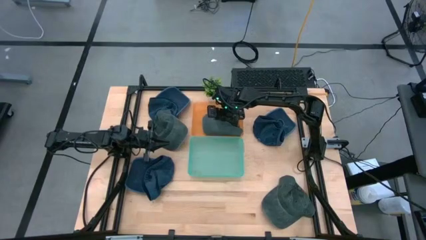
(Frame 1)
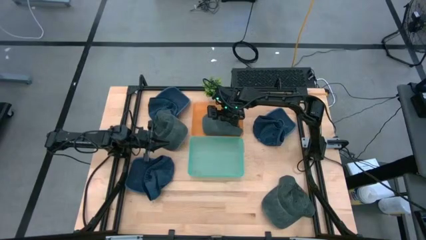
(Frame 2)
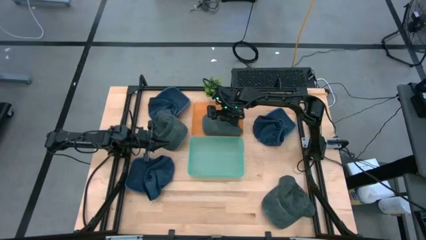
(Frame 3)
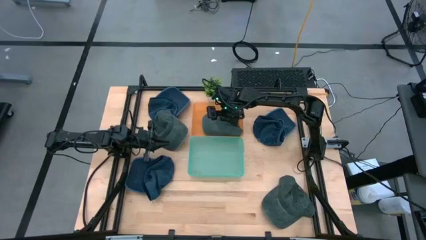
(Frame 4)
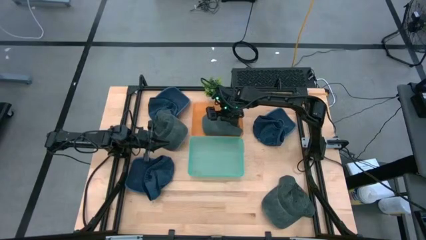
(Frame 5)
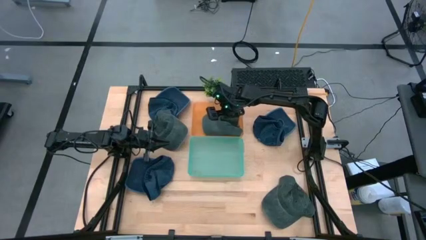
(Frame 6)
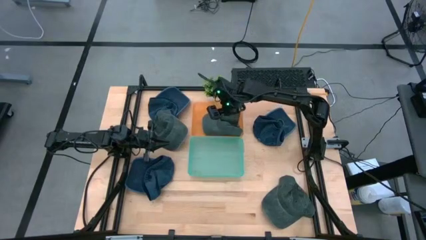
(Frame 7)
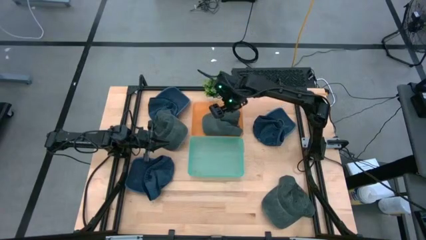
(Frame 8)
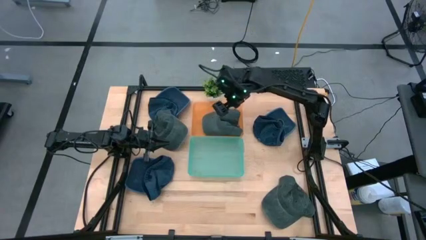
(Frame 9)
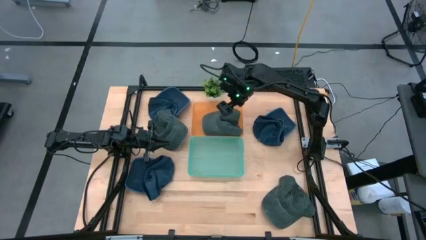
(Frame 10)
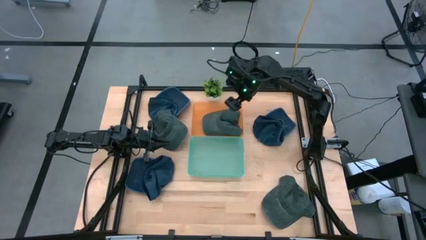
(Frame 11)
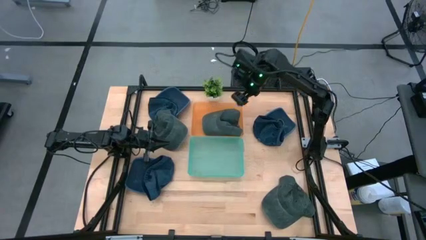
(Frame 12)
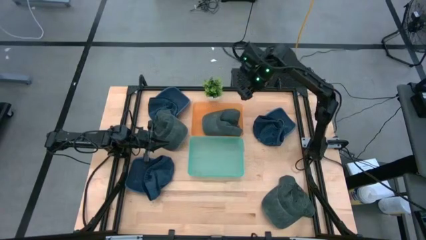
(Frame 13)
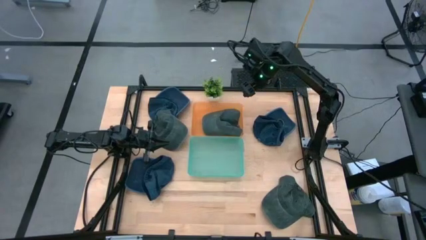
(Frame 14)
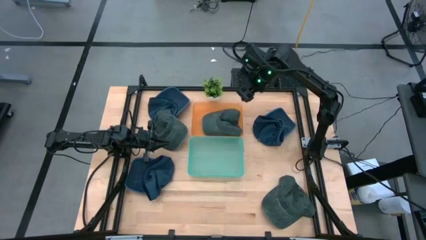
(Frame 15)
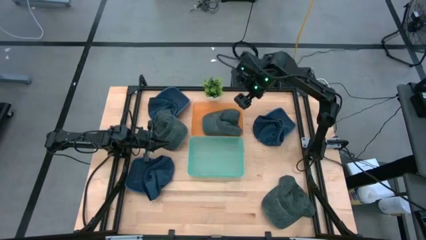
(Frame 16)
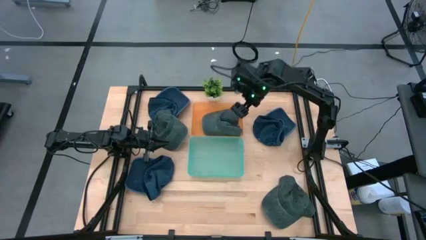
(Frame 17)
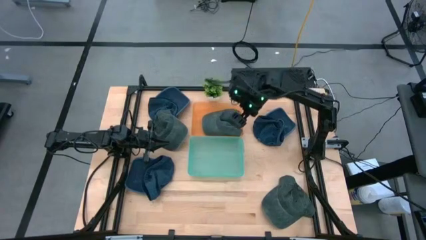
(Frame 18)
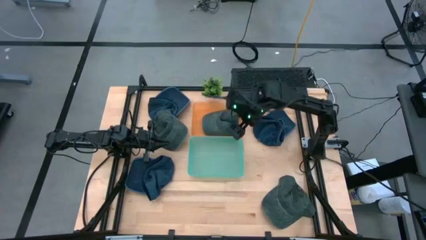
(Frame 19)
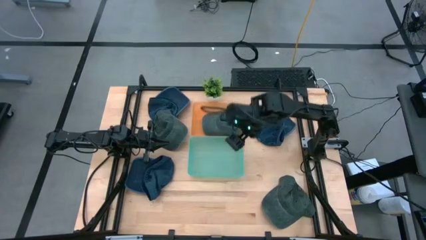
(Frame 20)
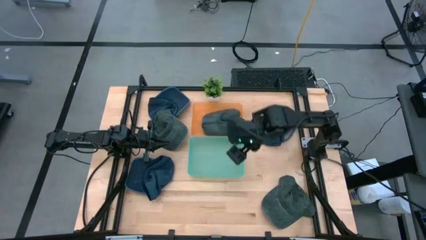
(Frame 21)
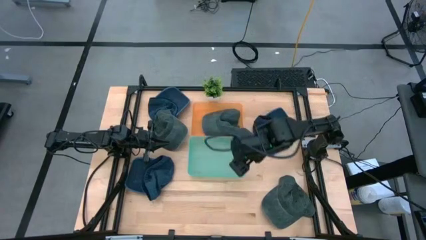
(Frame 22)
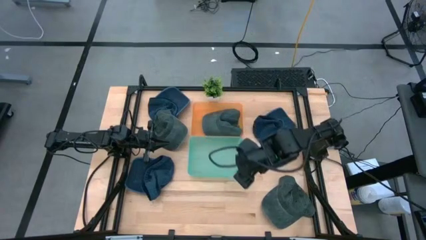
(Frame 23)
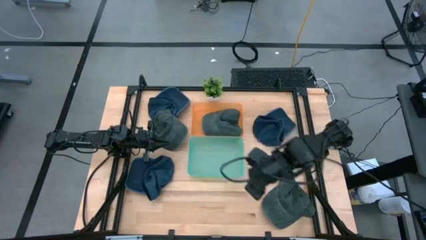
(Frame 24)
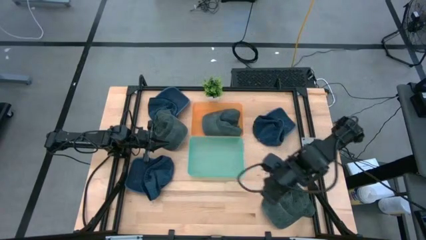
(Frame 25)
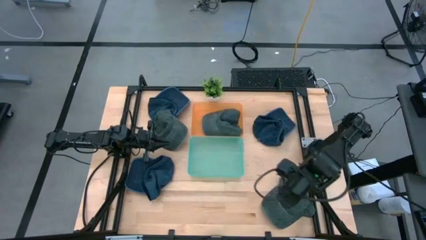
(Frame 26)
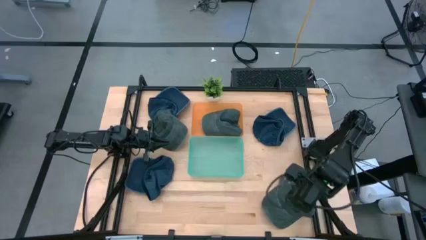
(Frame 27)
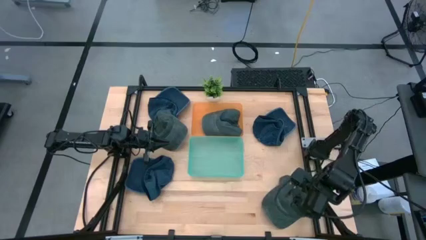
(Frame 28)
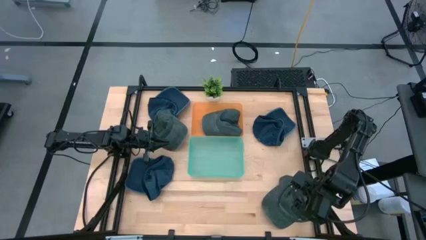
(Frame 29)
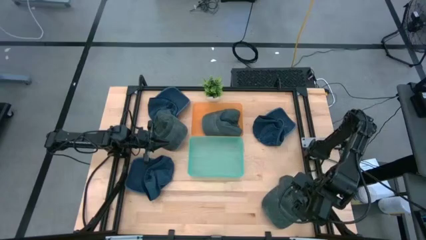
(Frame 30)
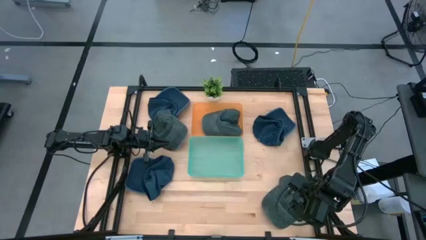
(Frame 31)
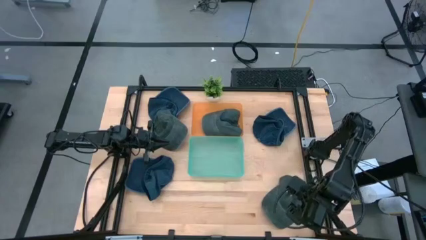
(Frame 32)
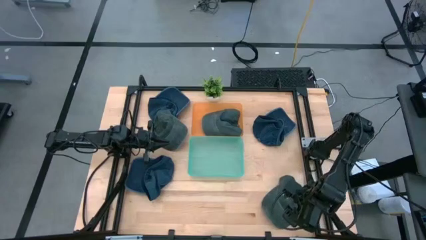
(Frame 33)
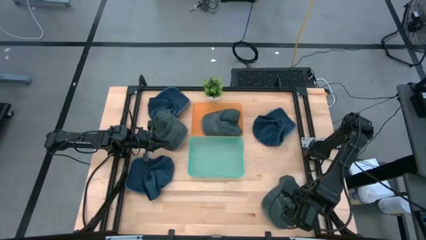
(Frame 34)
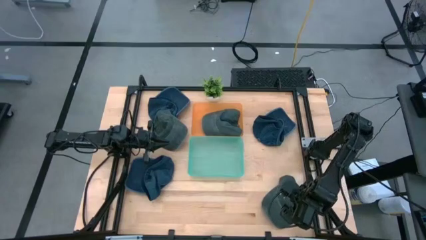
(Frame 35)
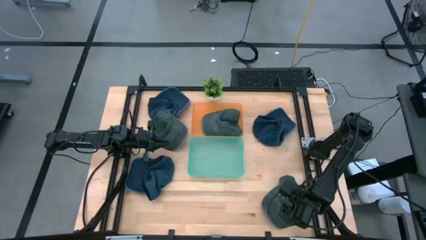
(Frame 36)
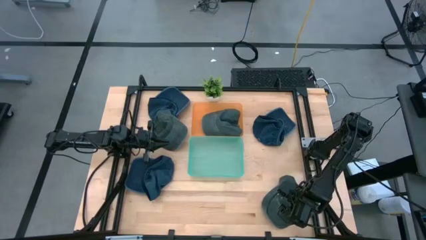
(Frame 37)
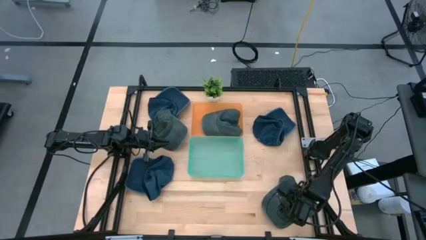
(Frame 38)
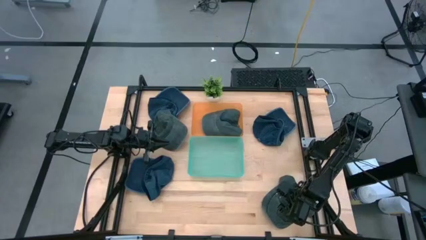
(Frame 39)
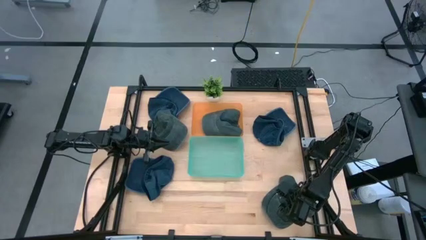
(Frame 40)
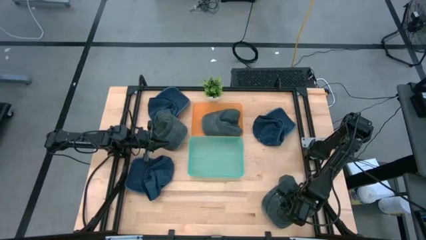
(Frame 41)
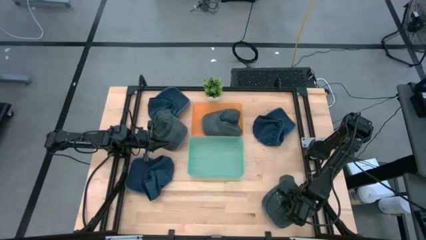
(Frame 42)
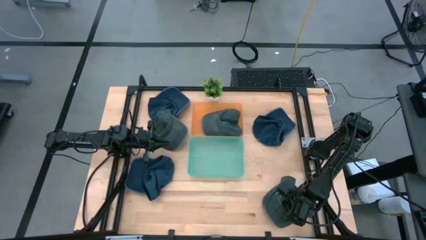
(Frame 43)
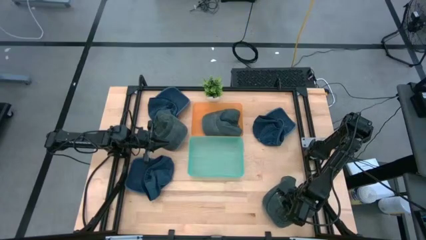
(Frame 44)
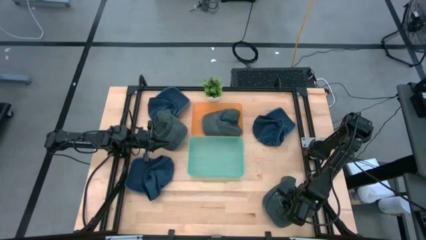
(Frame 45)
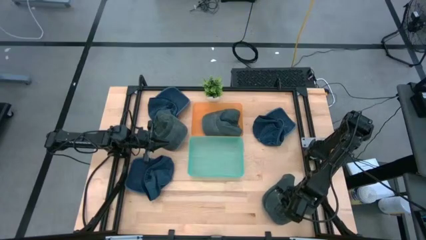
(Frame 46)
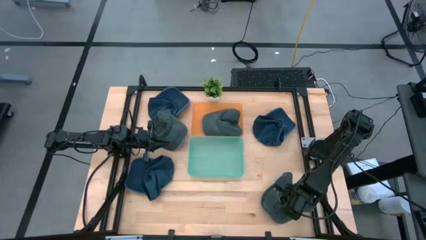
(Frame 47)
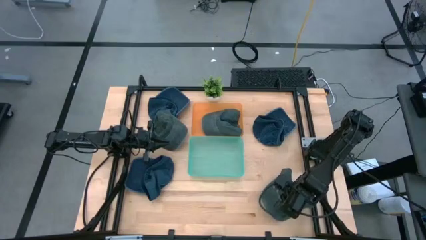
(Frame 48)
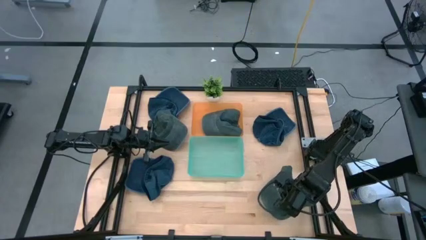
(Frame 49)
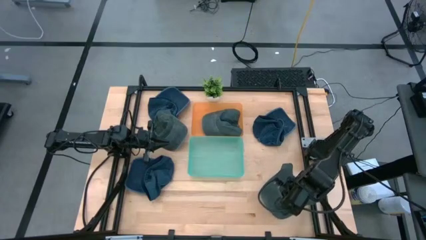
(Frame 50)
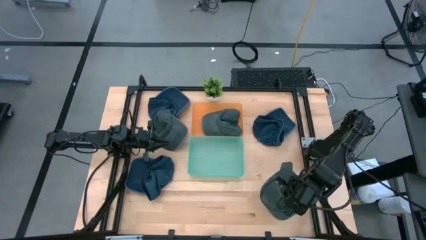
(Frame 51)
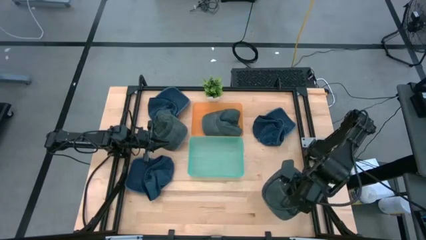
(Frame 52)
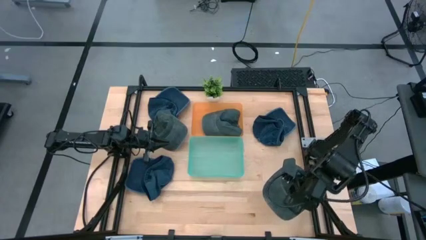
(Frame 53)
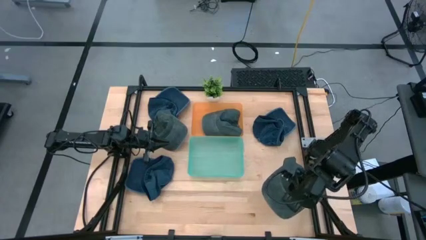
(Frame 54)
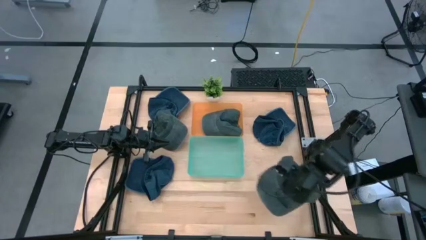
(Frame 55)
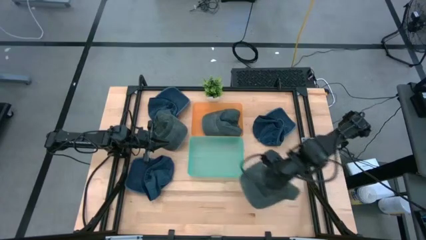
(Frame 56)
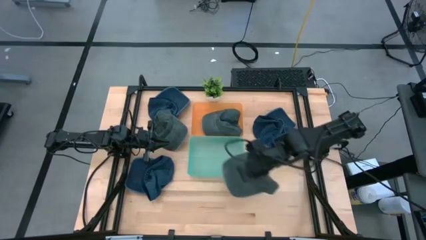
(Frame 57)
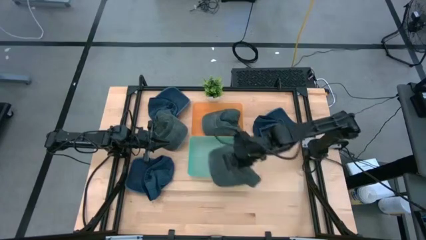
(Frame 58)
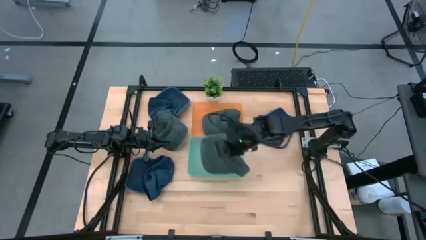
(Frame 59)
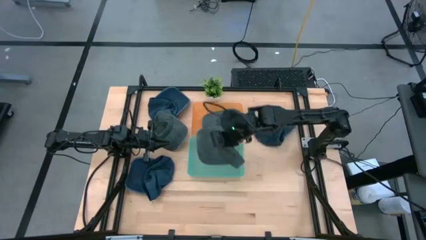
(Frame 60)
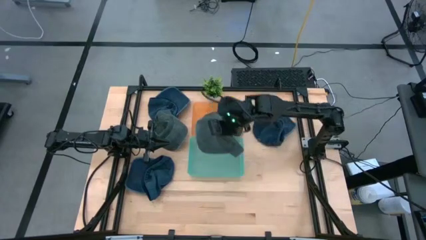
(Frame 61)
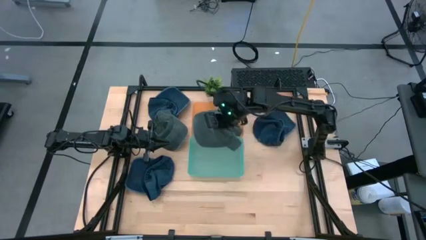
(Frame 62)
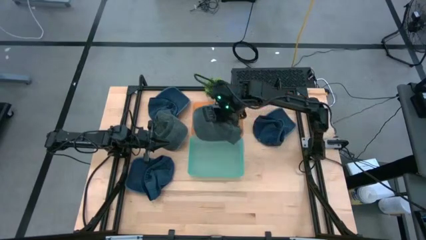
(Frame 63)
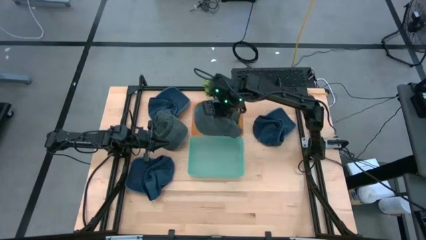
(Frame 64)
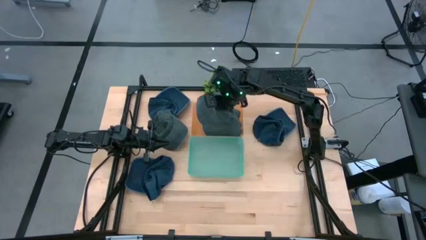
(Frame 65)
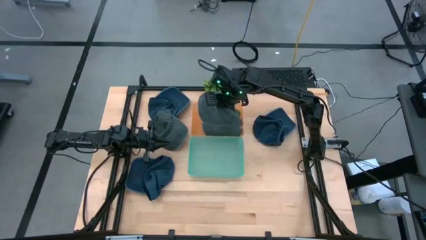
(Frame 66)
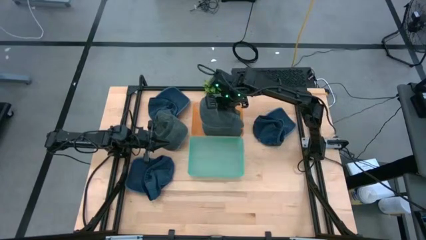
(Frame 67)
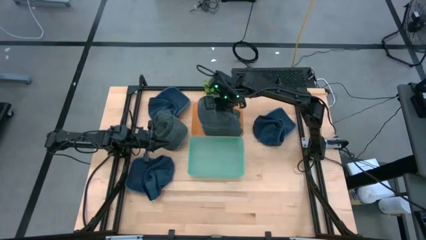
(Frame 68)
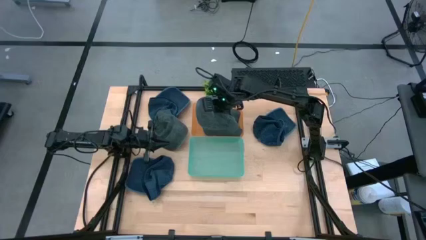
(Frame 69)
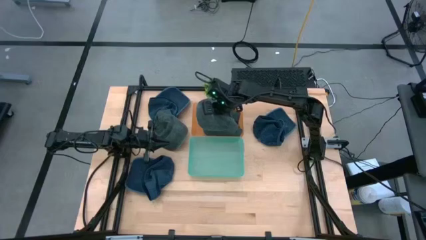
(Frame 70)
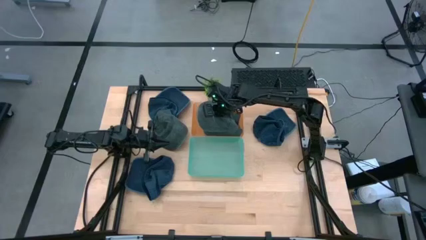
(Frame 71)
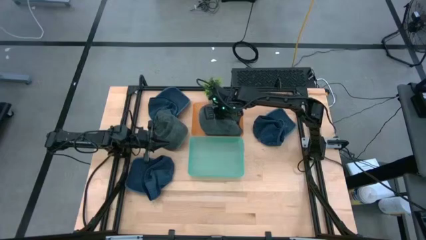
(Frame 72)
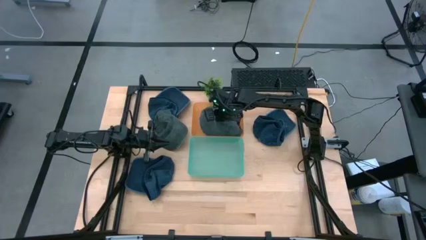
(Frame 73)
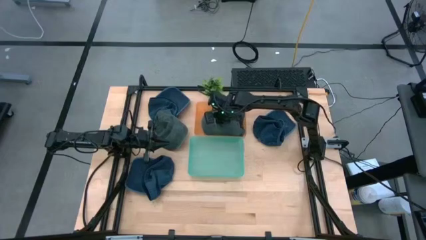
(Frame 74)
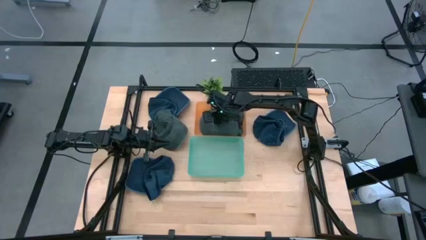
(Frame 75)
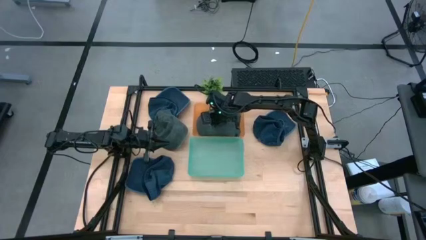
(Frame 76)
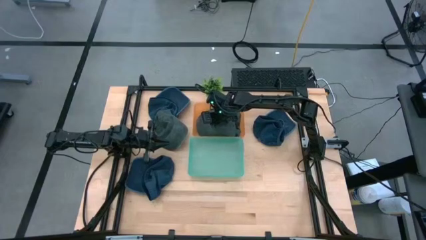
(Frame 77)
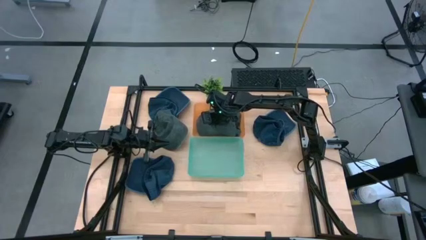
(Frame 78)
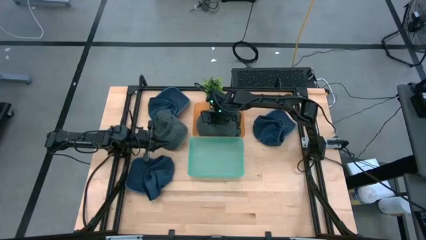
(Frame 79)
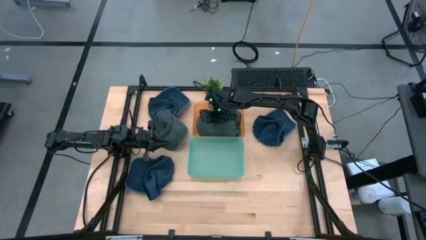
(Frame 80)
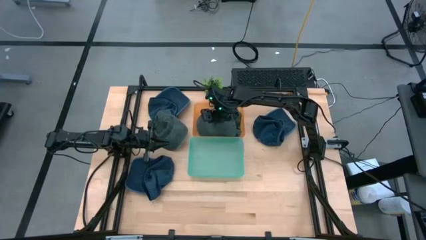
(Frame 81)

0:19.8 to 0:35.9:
Task: Pick & Place hat
Put the right gray cap into the orange bin
